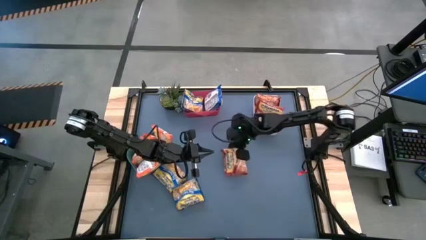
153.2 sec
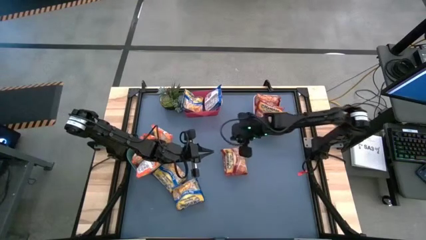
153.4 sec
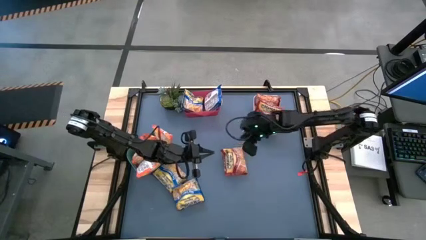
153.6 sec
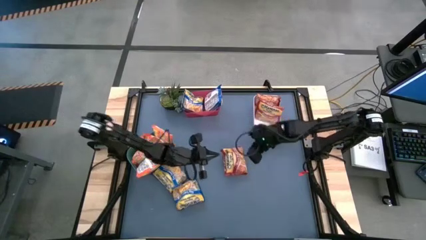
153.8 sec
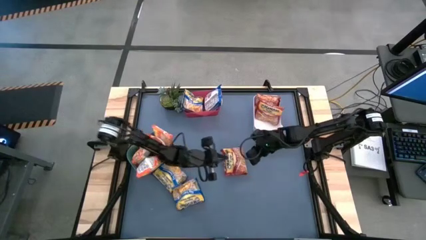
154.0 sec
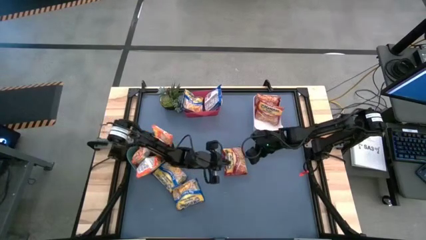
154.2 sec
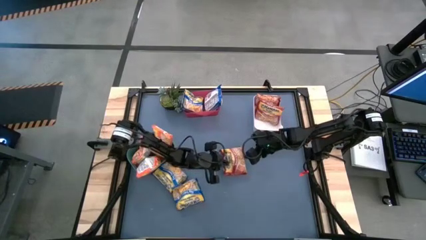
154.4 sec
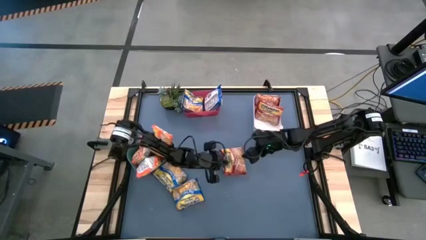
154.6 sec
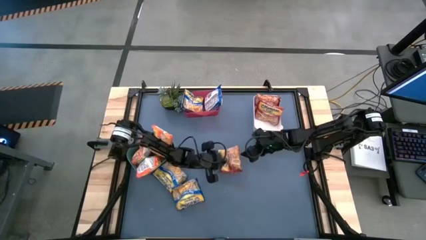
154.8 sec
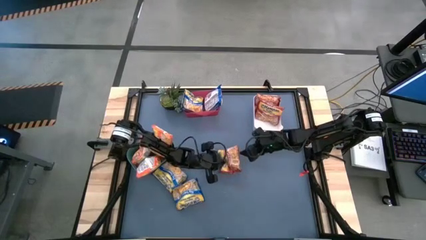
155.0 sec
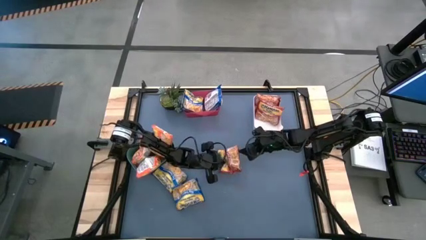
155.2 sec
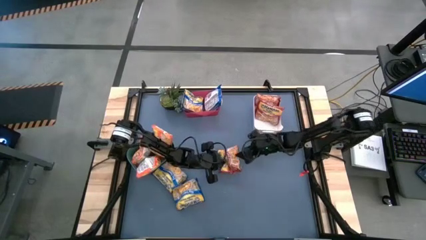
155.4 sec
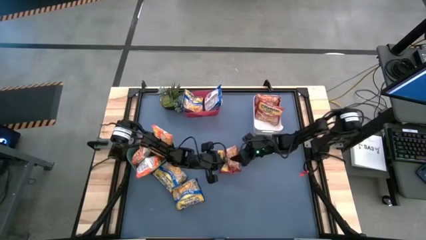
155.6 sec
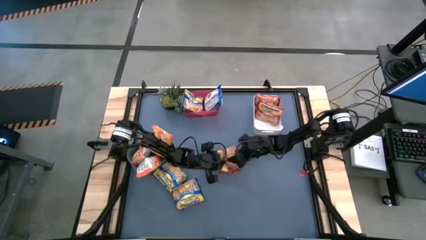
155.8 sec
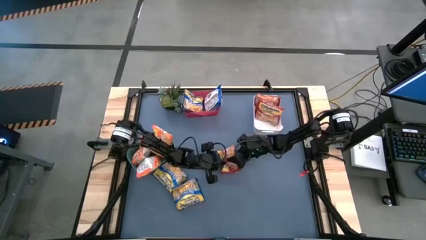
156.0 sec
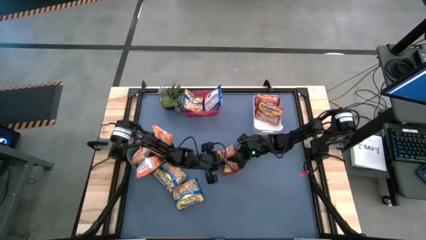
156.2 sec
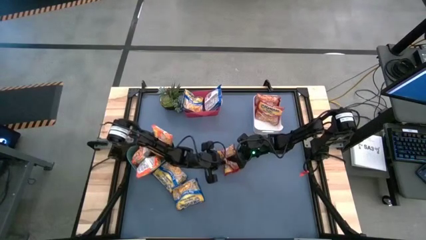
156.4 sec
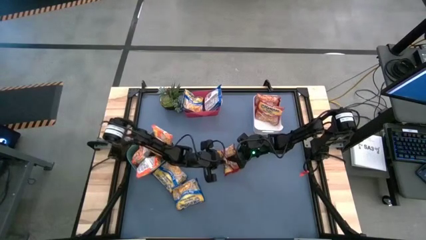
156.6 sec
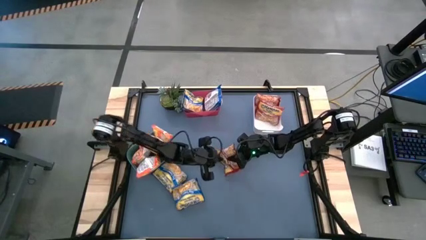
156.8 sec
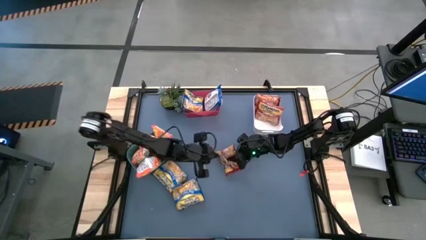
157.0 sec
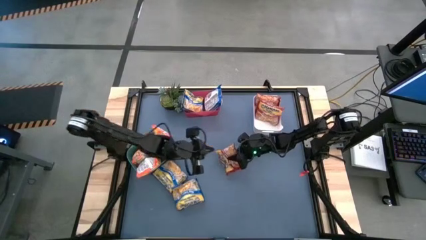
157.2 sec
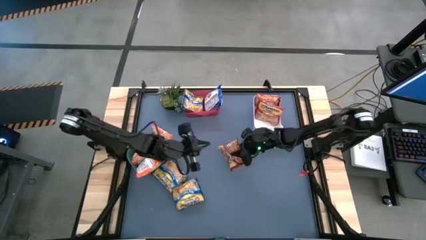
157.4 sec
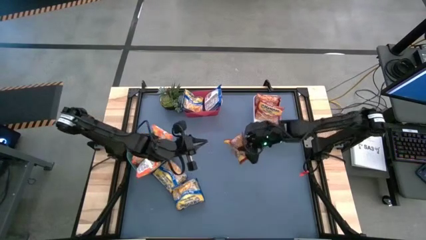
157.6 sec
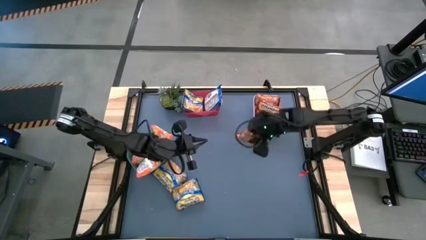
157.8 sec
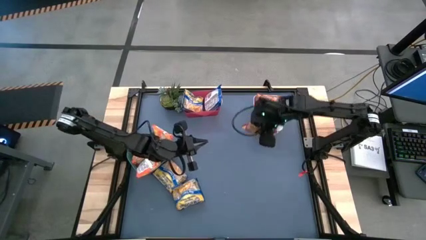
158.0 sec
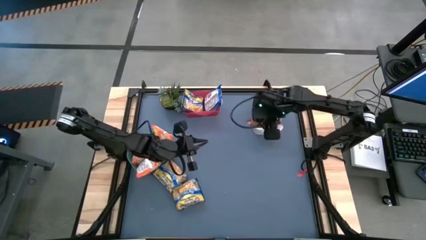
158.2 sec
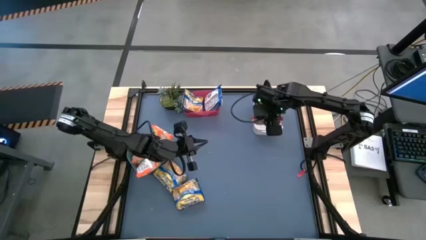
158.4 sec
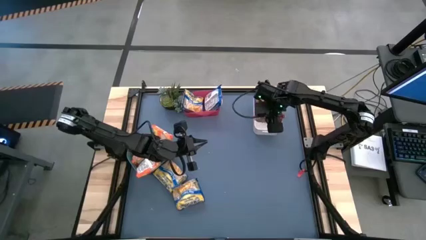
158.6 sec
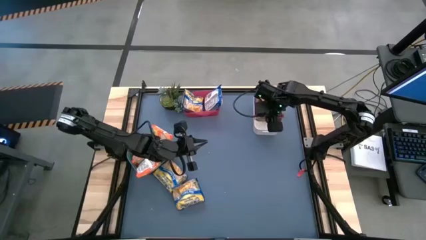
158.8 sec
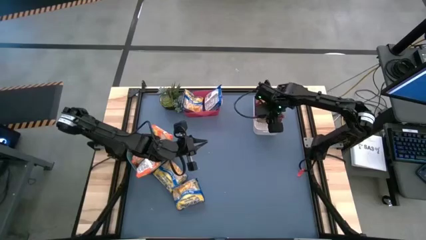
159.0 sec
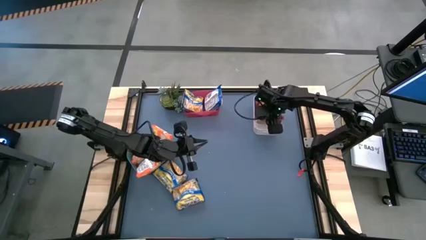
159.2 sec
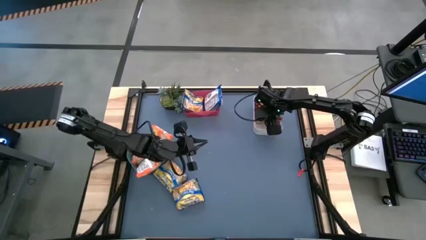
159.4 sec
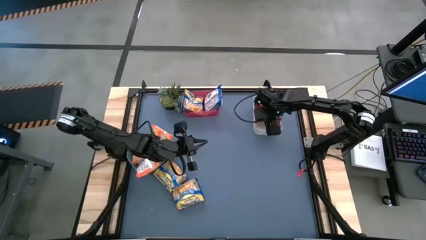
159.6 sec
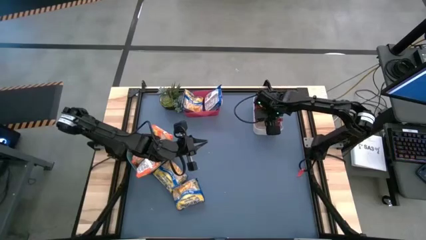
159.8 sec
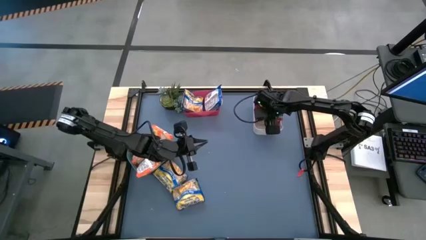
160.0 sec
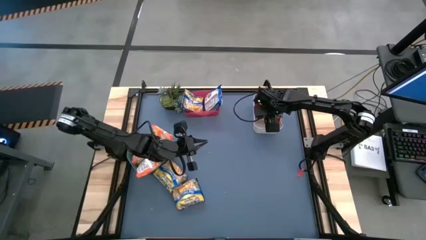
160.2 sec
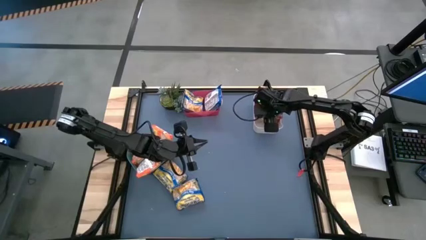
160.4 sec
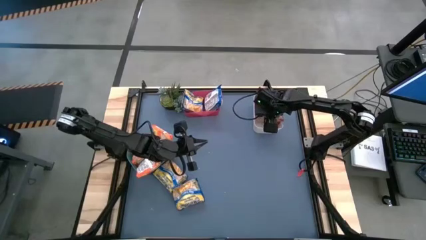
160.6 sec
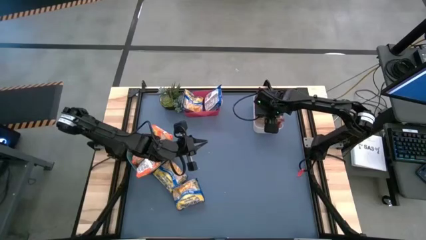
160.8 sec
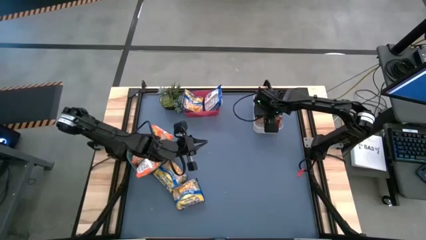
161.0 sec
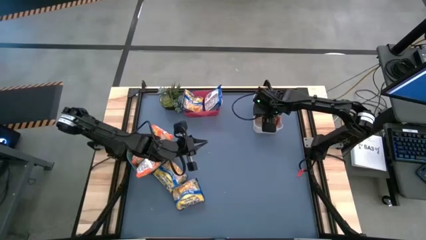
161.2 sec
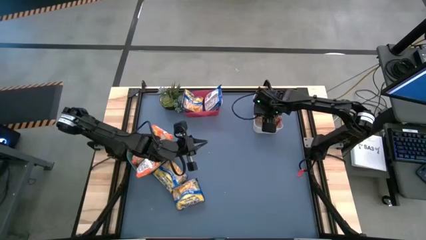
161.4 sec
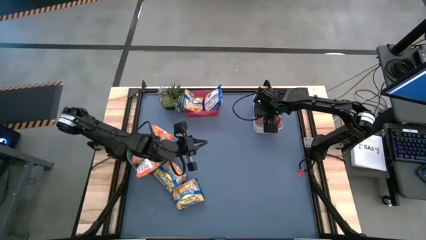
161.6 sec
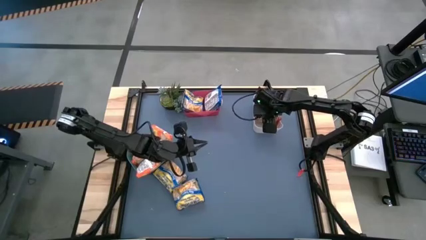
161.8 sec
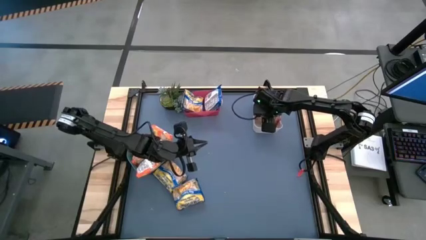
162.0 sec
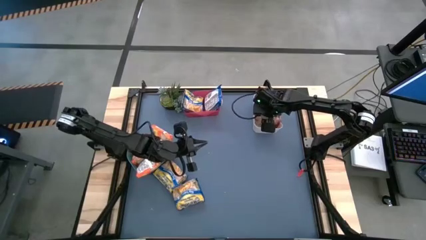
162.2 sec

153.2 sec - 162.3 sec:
Task: Sort Maruchan noodles
Put the red noodle pack into the white bin

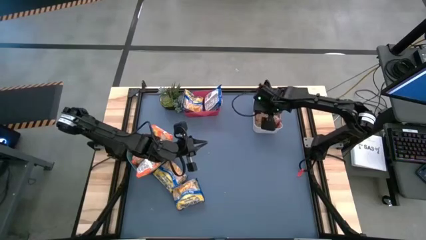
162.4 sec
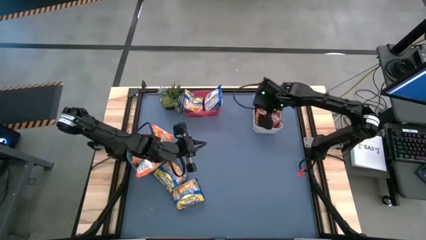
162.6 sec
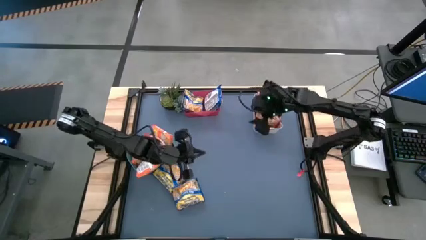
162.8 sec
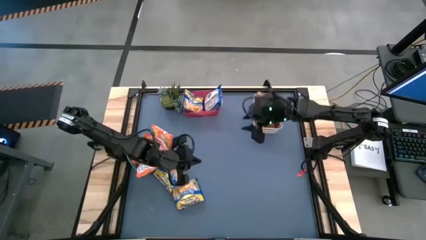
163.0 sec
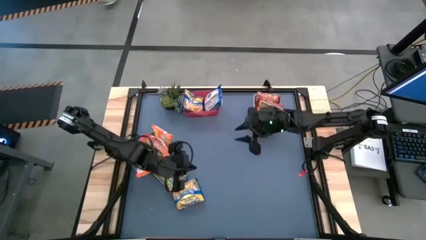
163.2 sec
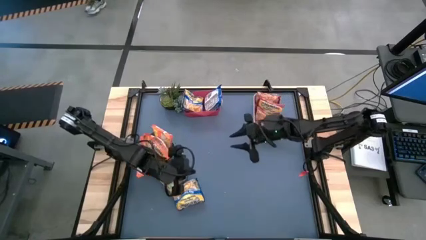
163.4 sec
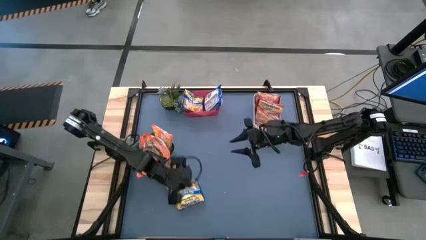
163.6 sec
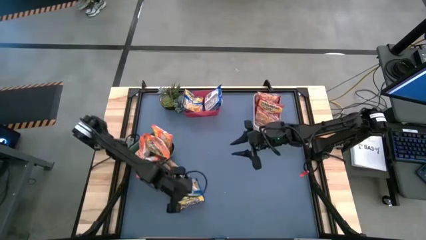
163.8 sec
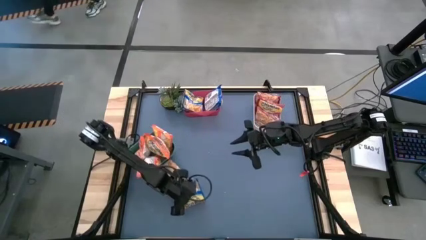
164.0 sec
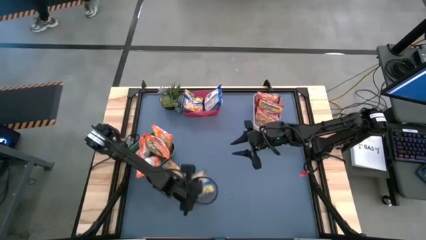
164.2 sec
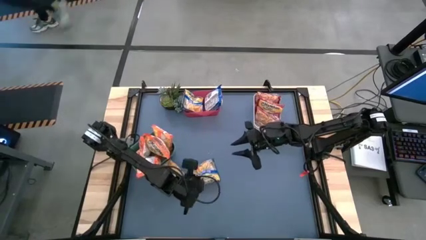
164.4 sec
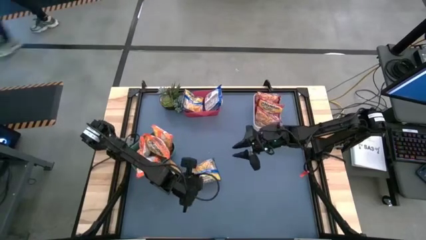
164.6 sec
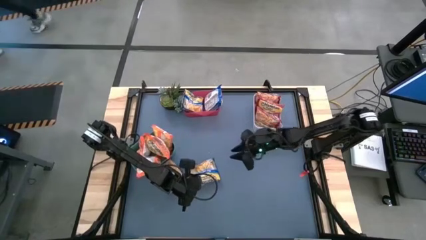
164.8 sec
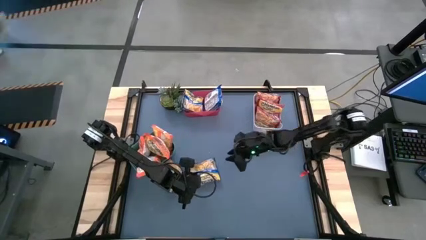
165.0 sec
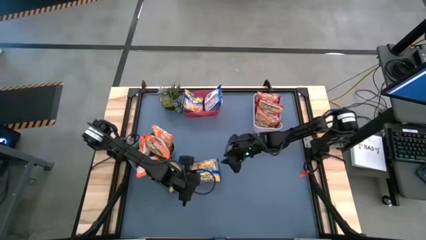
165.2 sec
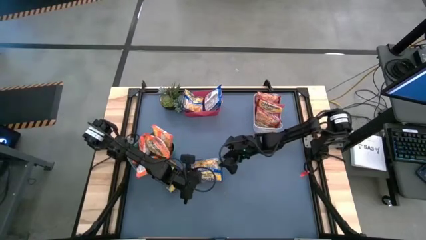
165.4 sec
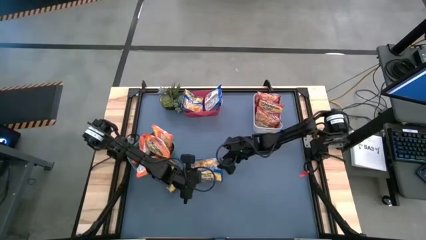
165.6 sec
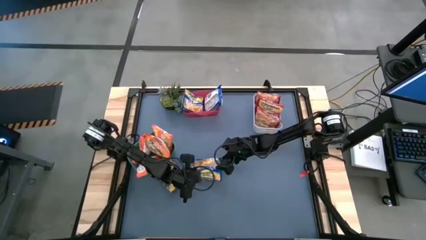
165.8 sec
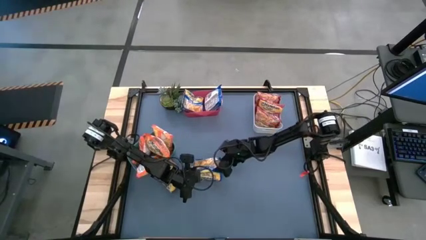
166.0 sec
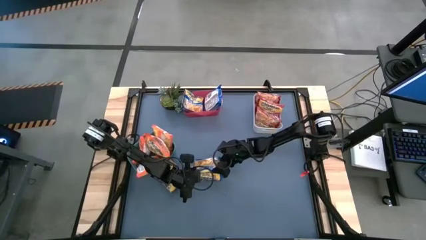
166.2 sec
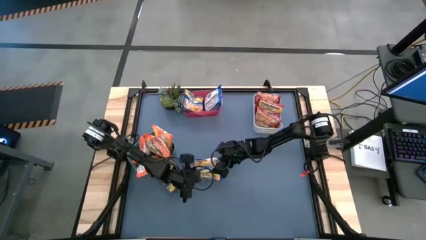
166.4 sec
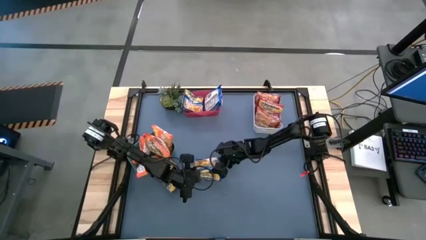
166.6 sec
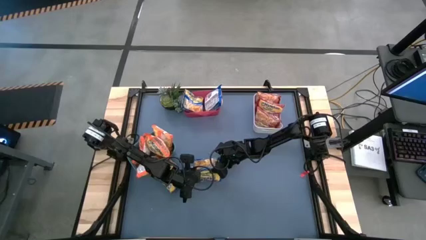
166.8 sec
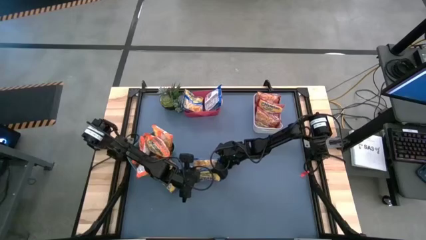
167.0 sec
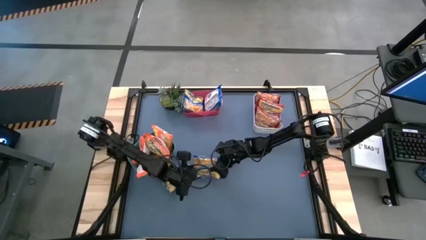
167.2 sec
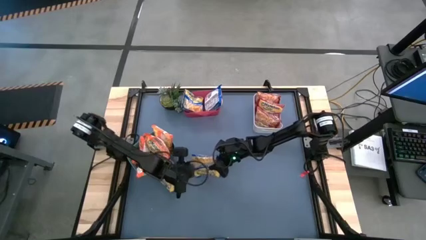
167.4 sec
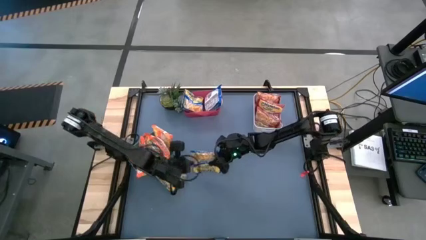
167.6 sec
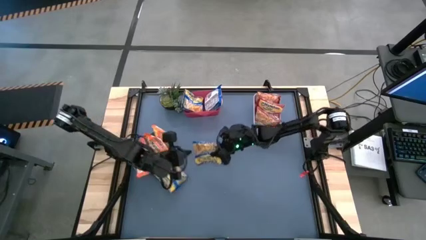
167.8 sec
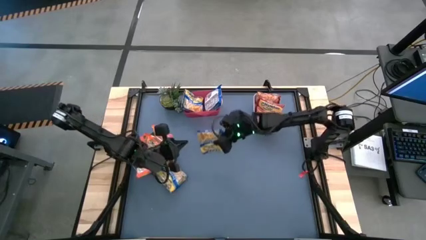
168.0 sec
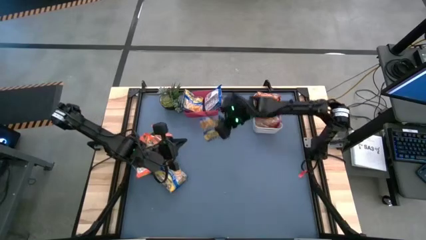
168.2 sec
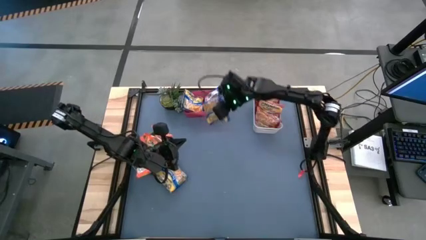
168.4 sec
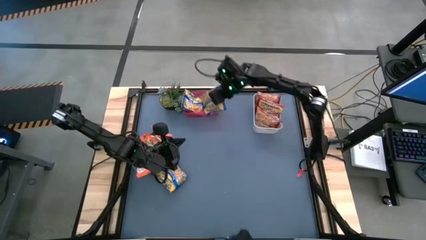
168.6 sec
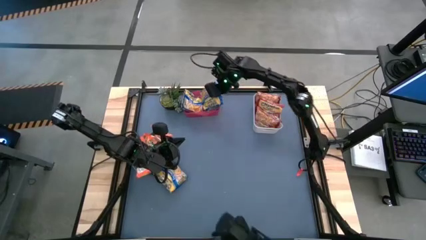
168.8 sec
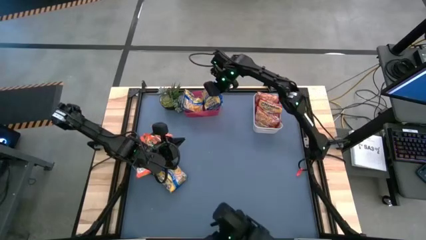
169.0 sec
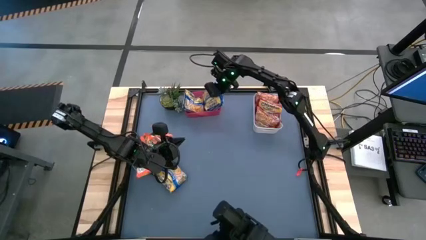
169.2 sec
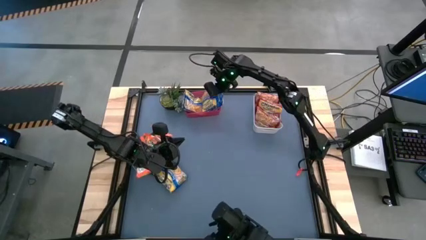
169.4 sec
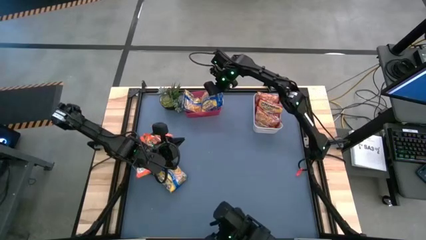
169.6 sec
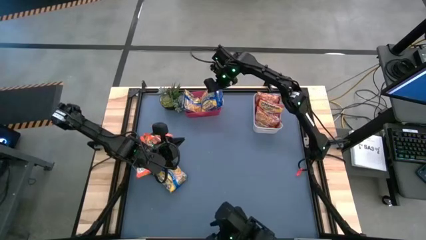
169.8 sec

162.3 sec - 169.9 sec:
Put the blue noodle pack into the red bin
